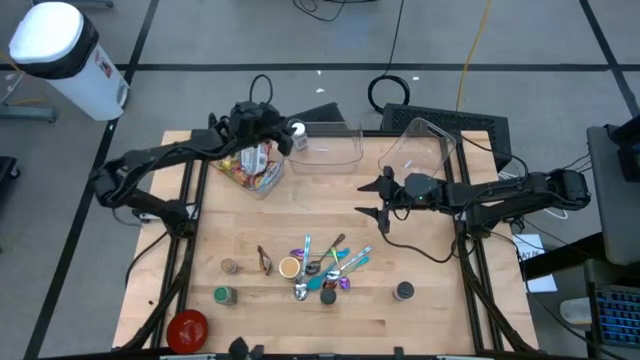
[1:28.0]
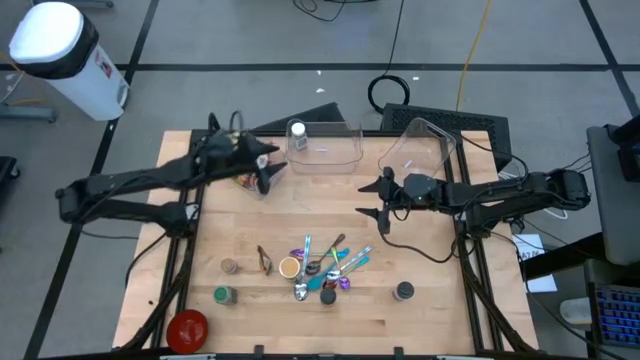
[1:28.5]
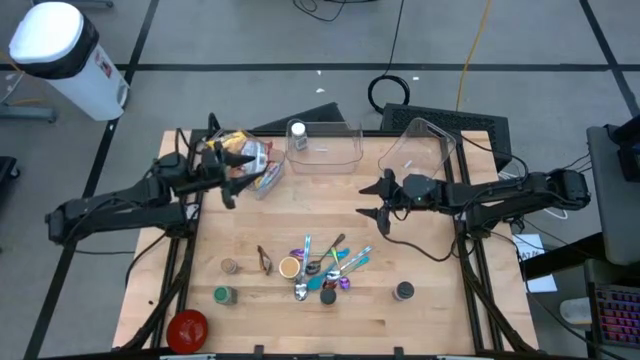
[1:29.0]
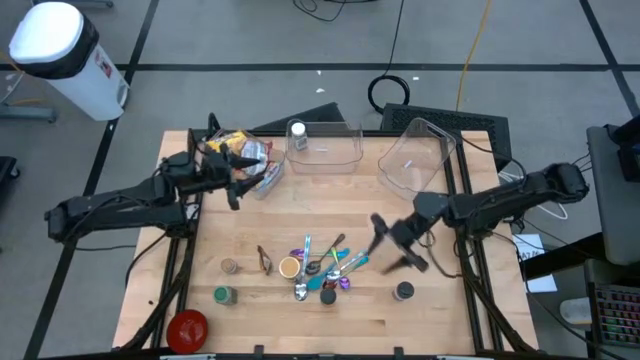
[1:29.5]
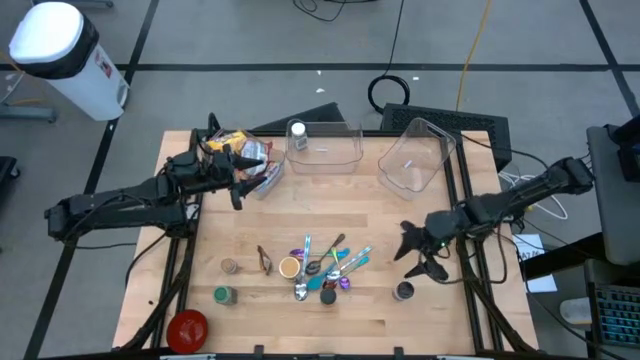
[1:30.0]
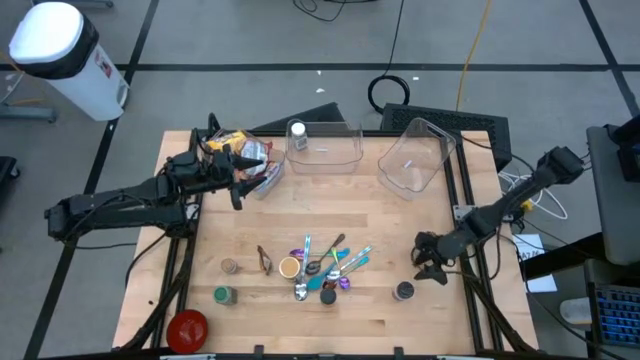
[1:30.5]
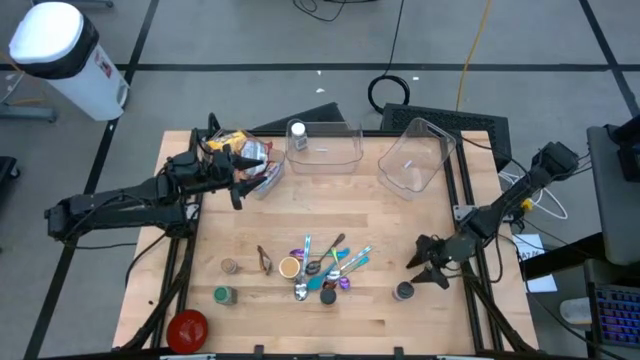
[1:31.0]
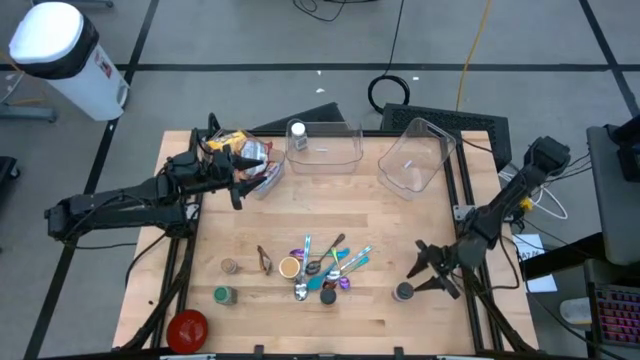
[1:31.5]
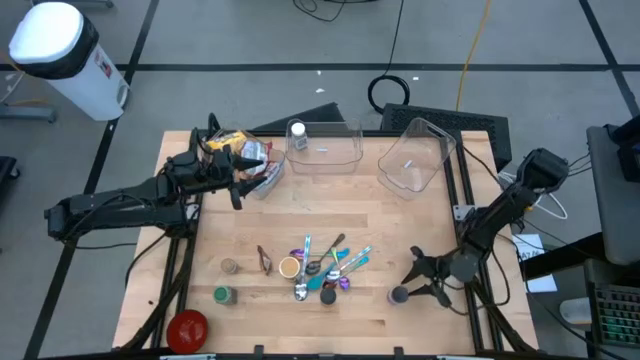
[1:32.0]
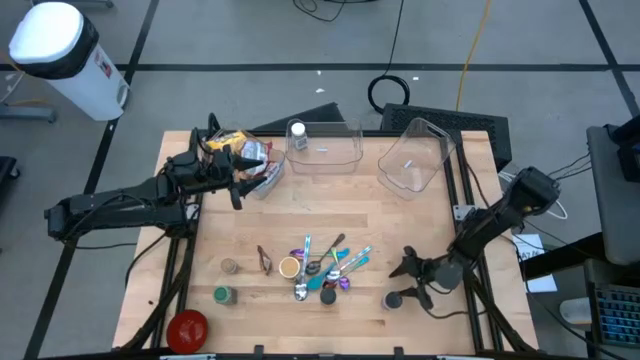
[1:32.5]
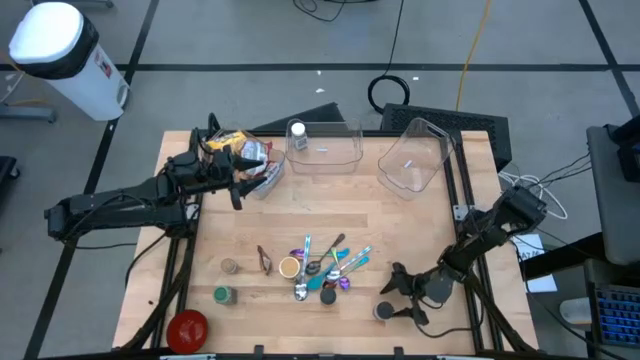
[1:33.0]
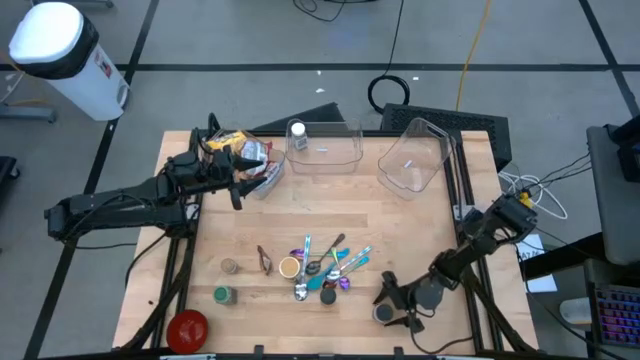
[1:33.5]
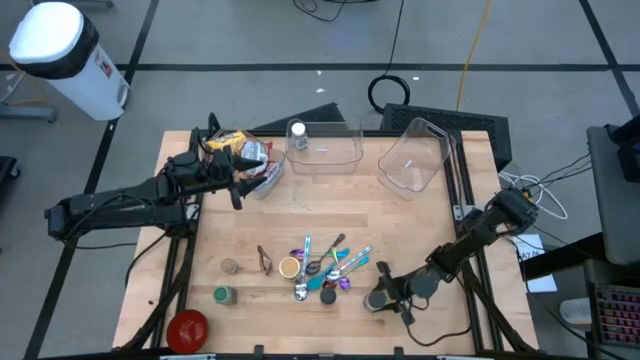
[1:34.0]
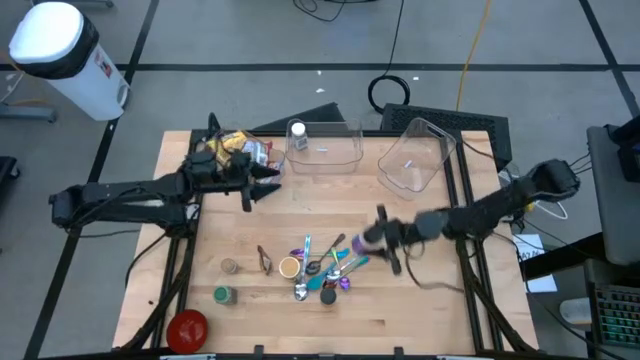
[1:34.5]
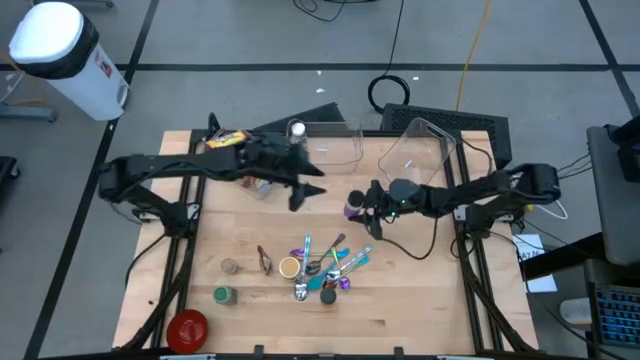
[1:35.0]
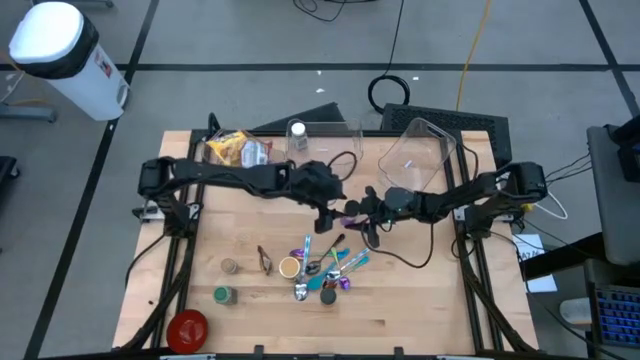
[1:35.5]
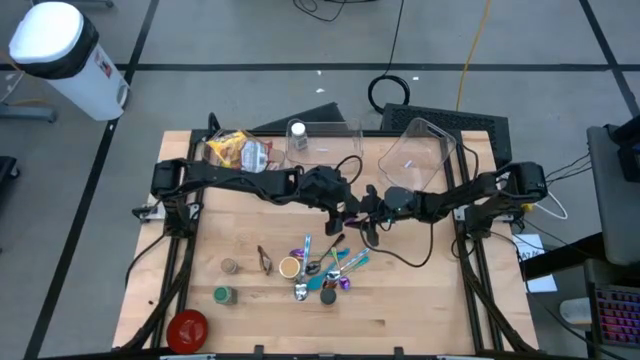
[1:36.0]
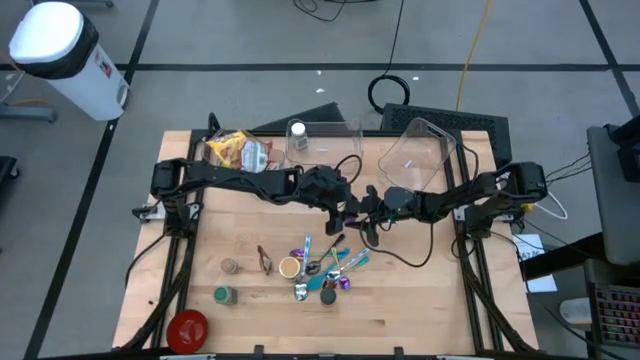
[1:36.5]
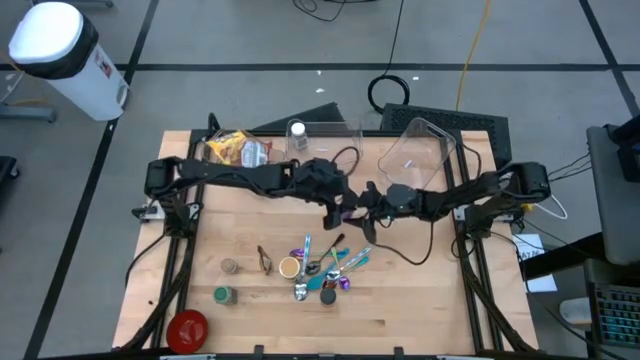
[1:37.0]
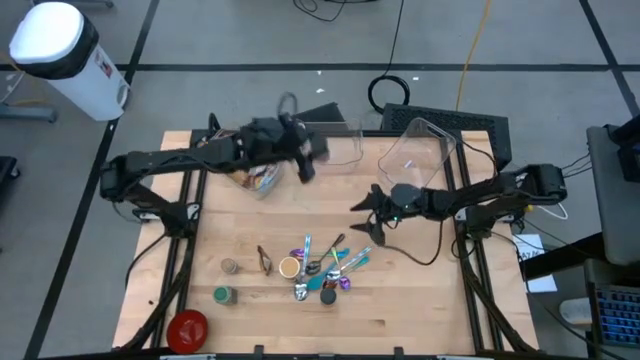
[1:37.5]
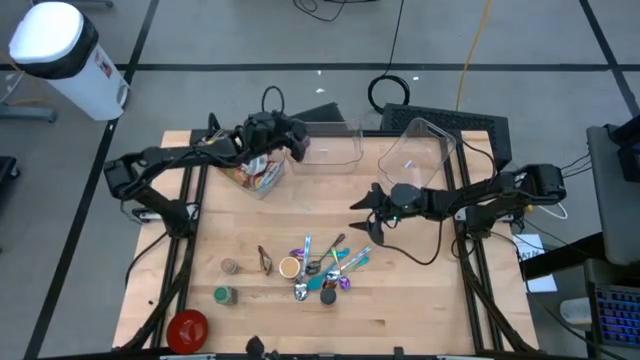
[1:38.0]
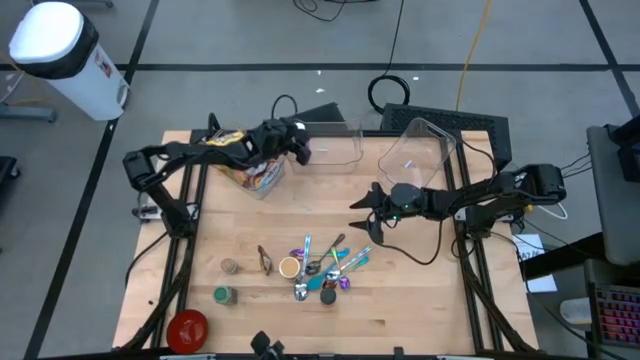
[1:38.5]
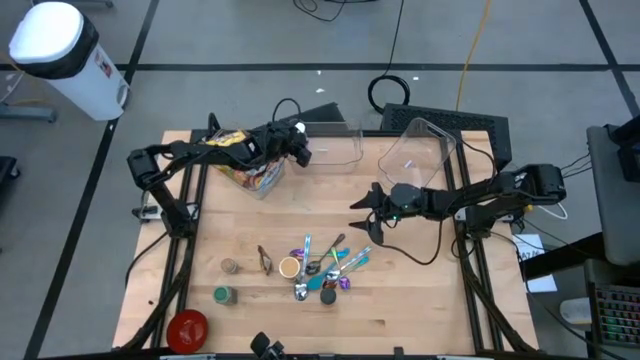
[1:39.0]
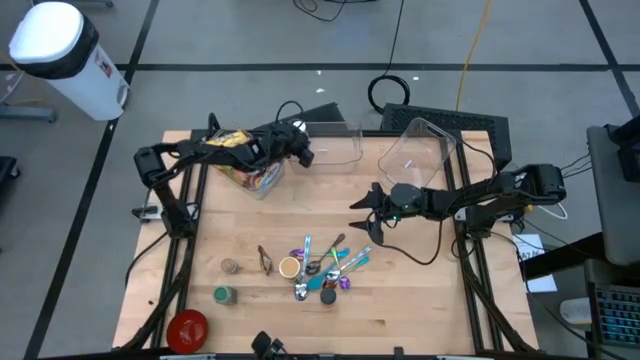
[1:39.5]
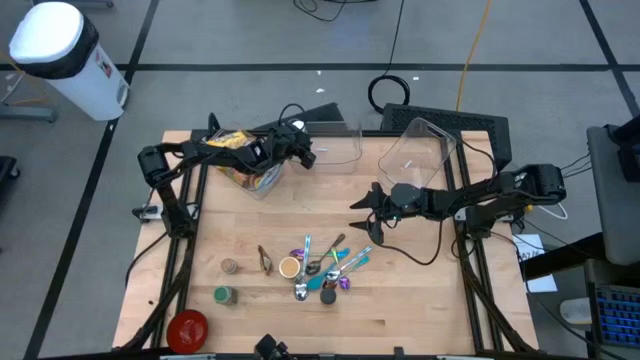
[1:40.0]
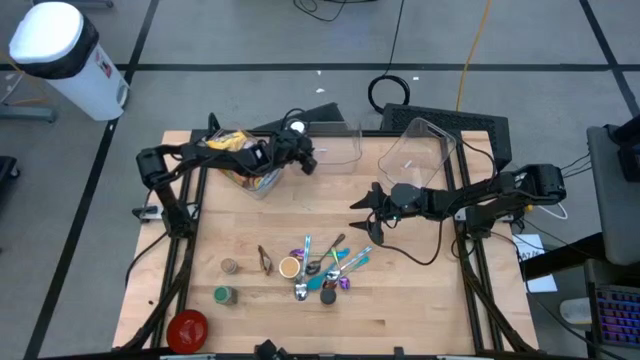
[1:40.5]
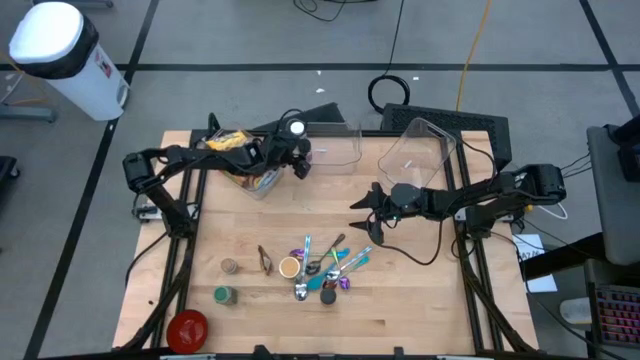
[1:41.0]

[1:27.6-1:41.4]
Task: Pick & Place Food Item
Put the purple seasoning bottle into the middle transparent bin

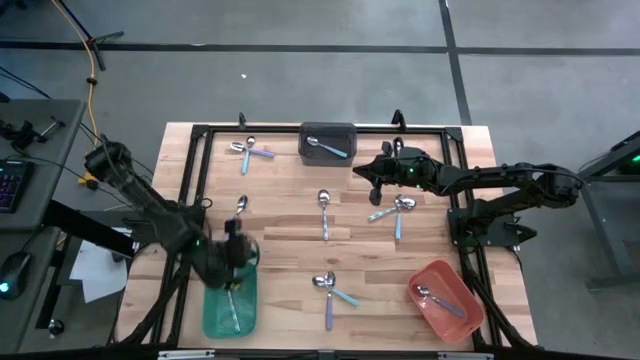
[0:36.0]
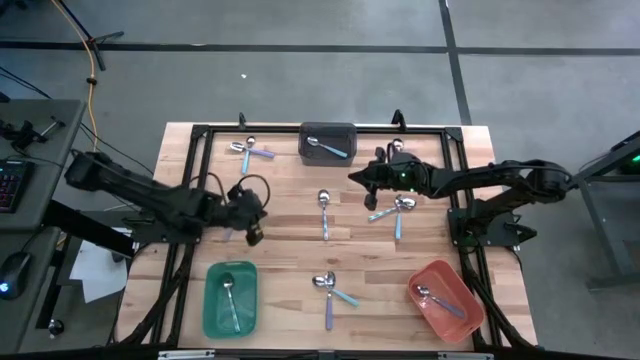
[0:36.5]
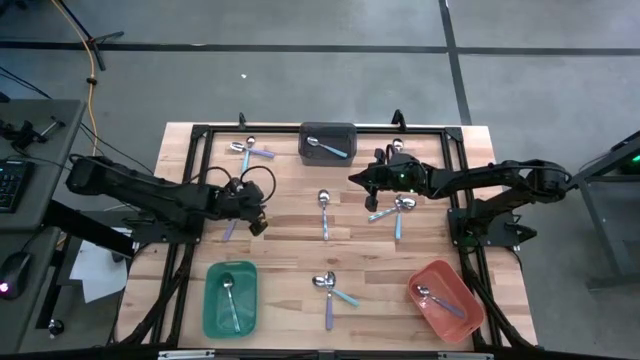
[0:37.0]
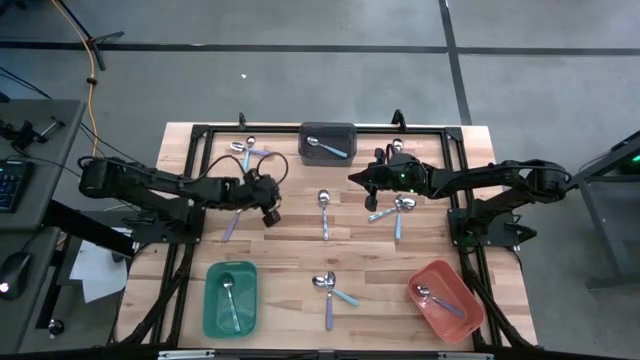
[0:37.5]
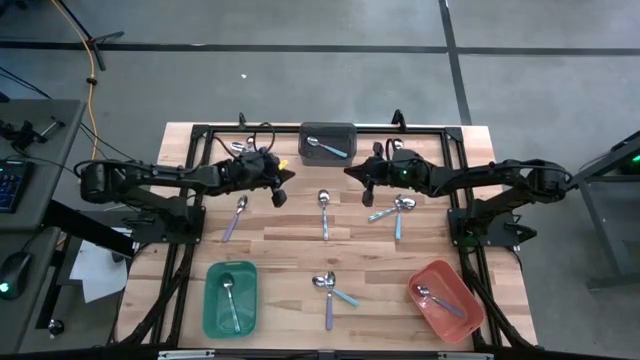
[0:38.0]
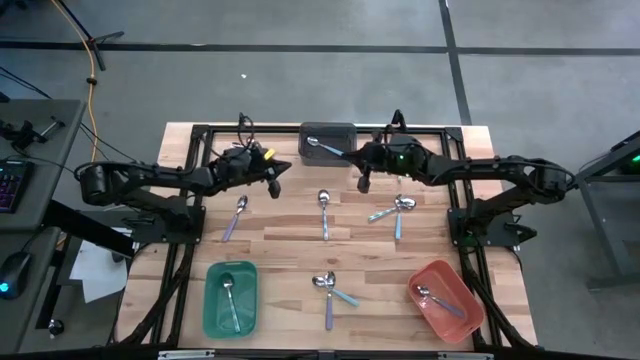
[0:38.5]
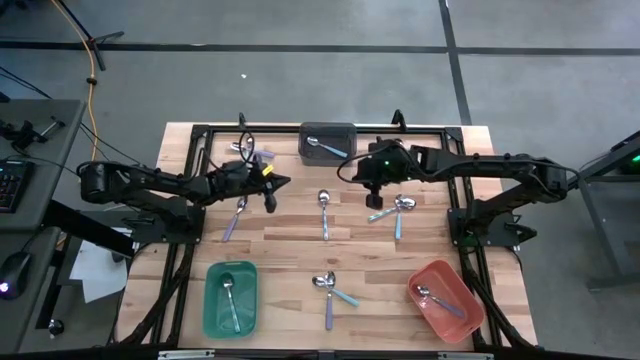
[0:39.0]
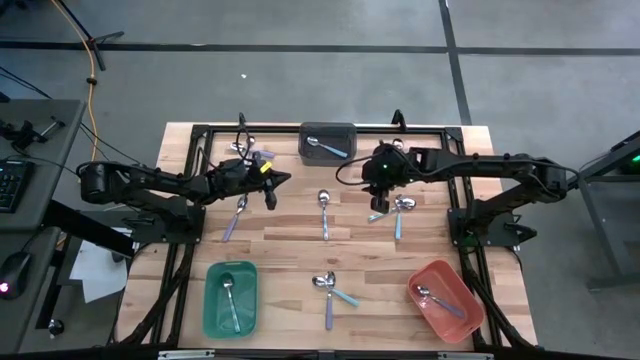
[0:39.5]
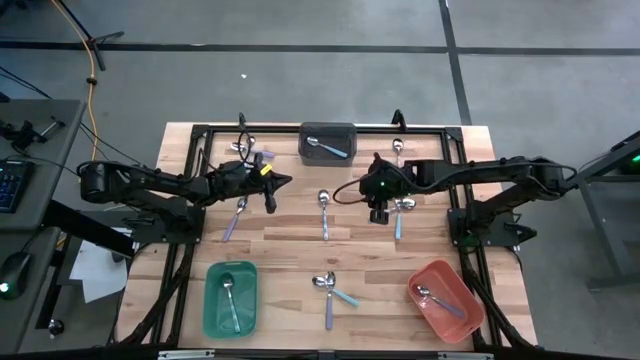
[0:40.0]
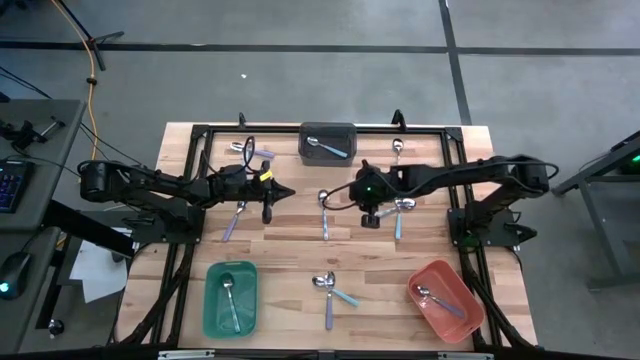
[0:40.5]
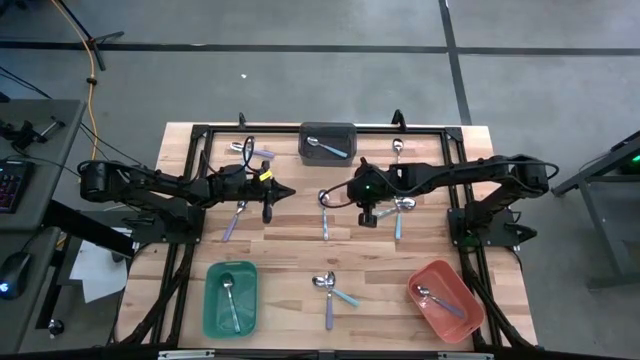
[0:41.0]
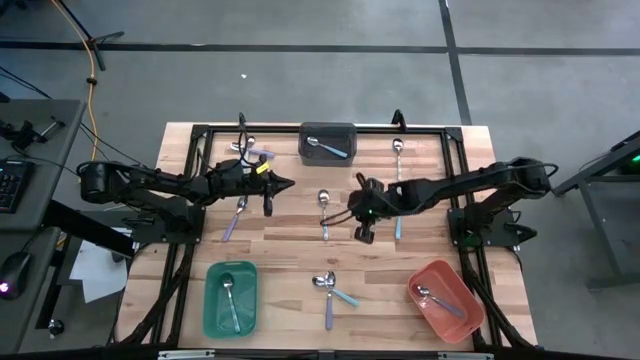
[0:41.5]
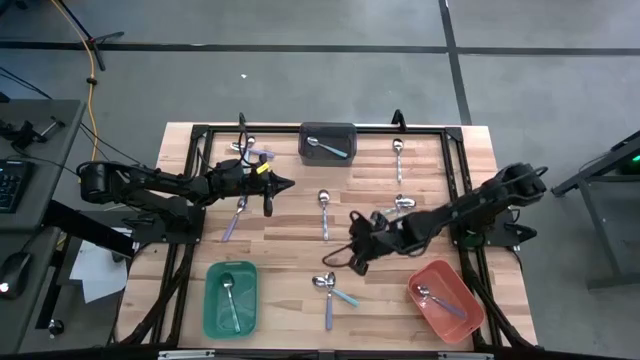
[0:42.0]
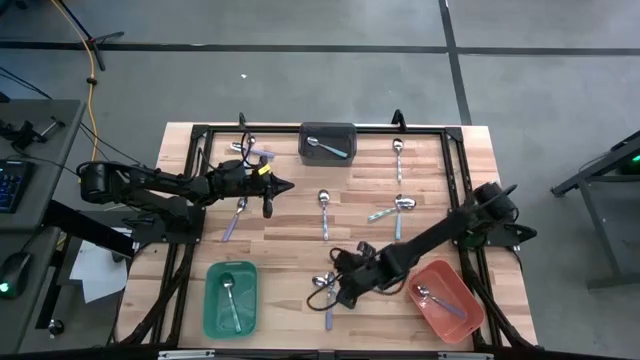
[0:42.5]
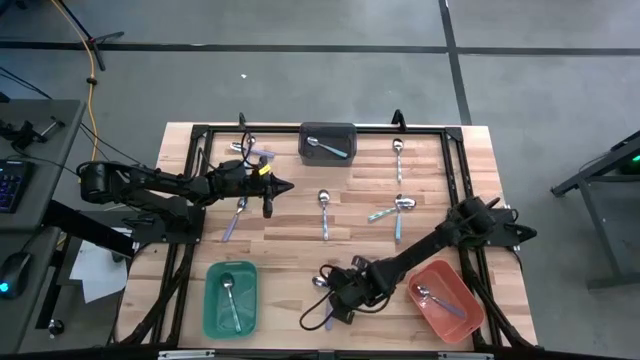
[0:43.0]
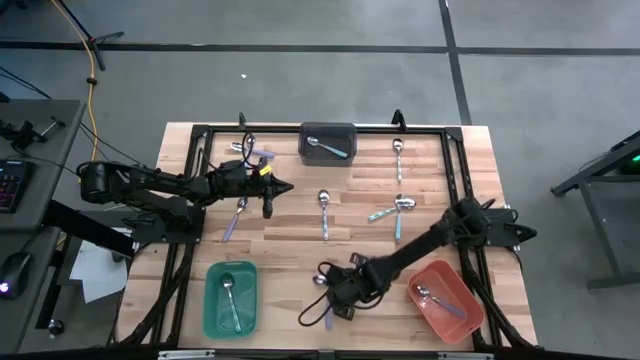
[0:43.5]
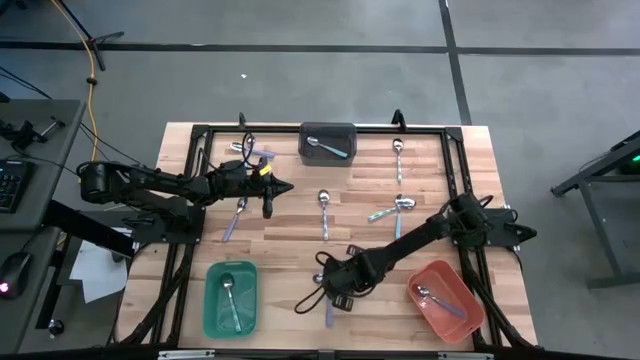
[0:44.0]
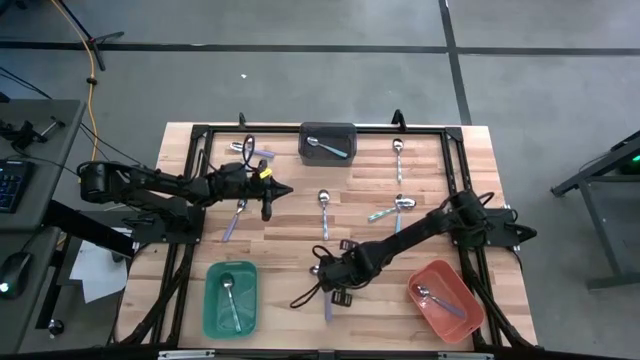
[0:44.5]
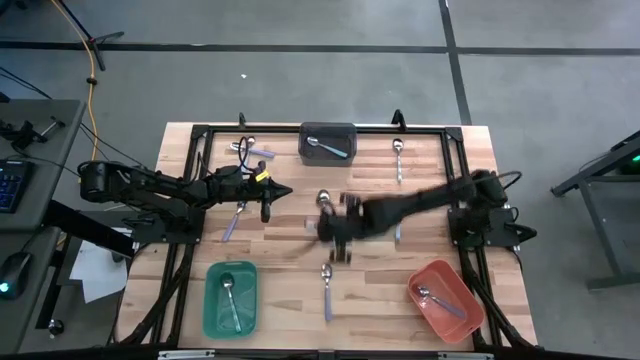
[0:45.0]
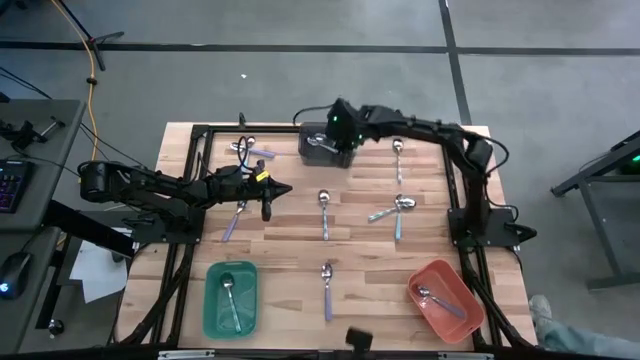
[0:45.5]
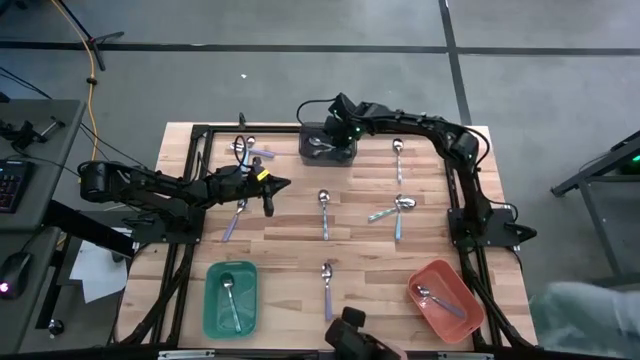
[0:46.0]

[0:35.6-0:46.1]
Task: Sort silverware by color (type)
Put the blue spoon into the black bin
